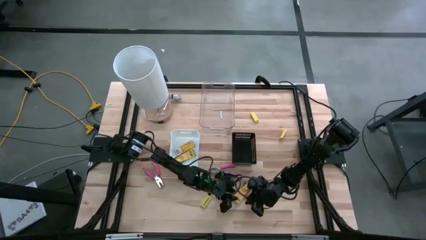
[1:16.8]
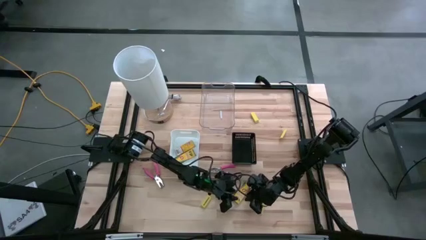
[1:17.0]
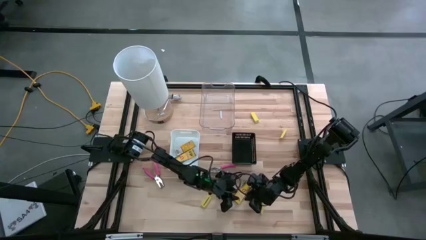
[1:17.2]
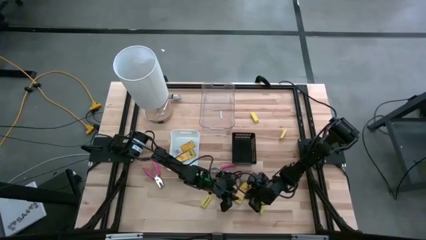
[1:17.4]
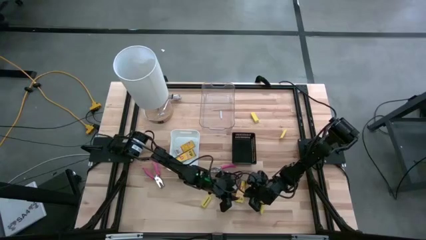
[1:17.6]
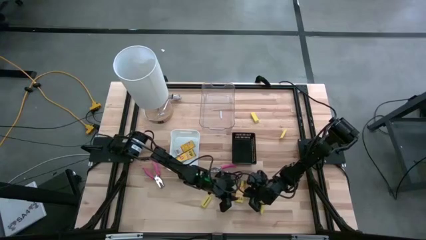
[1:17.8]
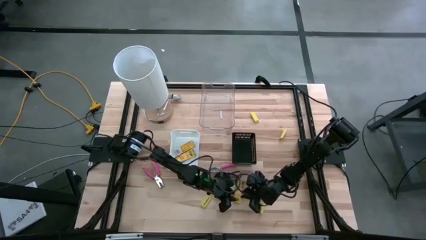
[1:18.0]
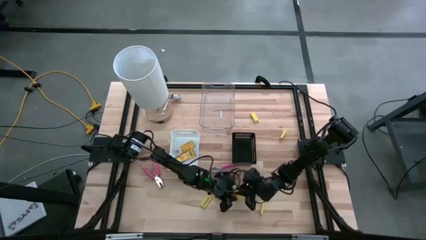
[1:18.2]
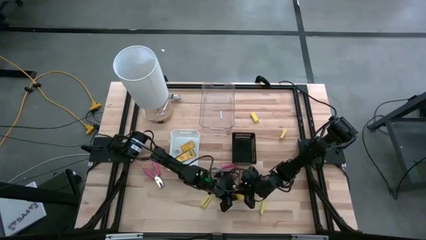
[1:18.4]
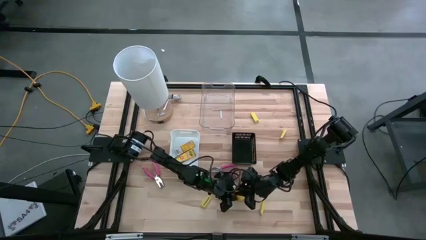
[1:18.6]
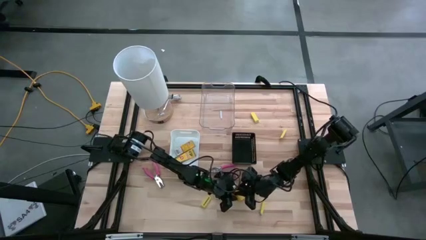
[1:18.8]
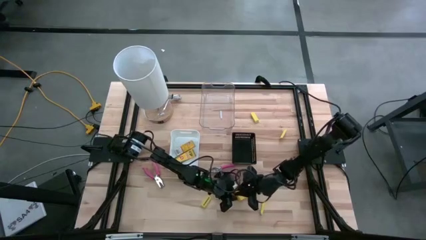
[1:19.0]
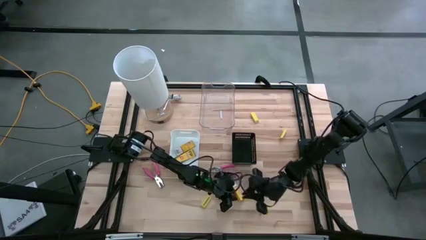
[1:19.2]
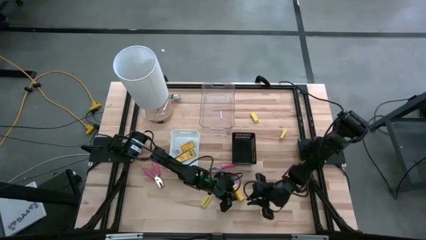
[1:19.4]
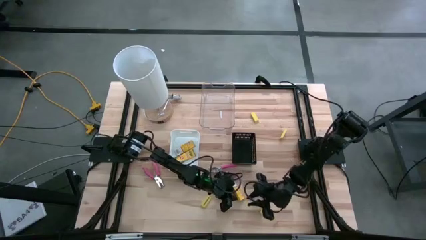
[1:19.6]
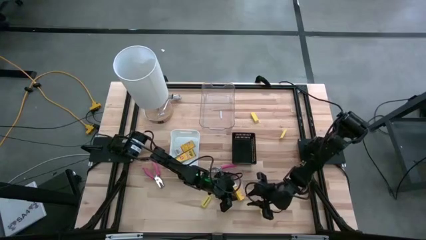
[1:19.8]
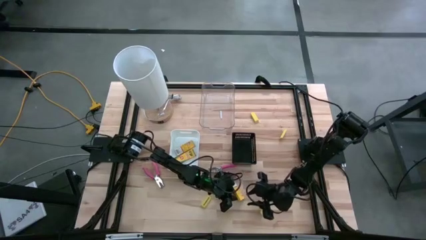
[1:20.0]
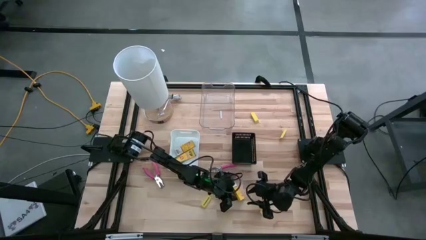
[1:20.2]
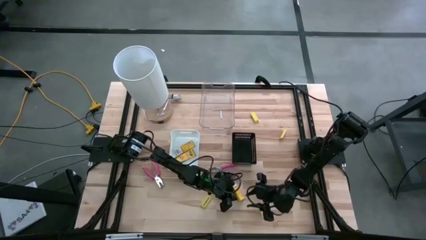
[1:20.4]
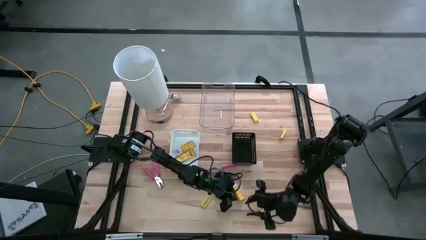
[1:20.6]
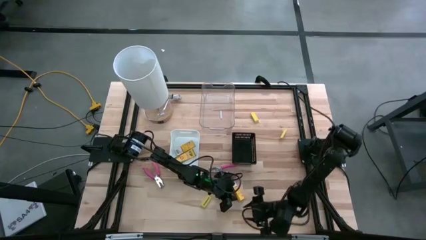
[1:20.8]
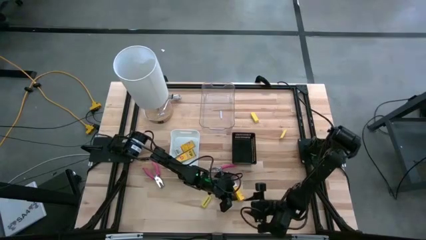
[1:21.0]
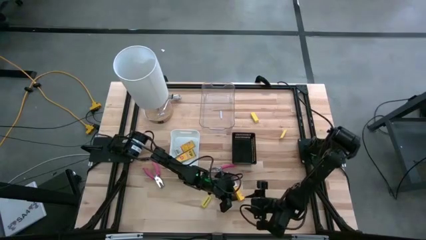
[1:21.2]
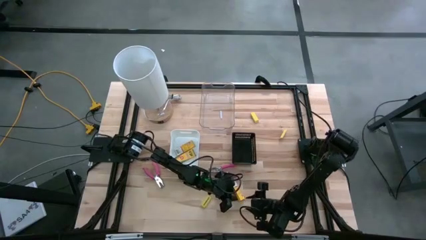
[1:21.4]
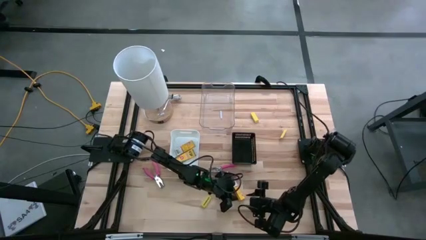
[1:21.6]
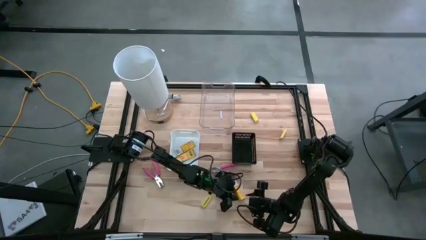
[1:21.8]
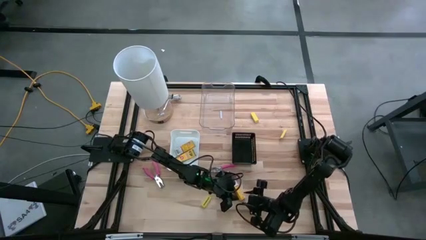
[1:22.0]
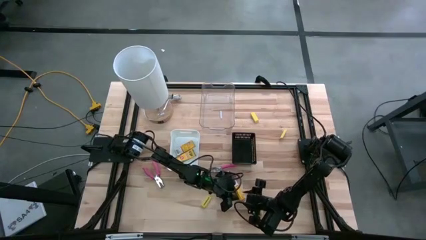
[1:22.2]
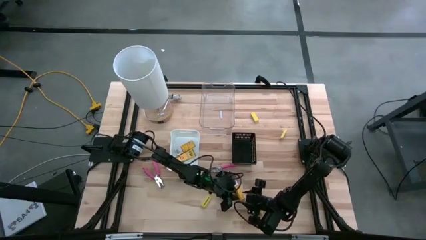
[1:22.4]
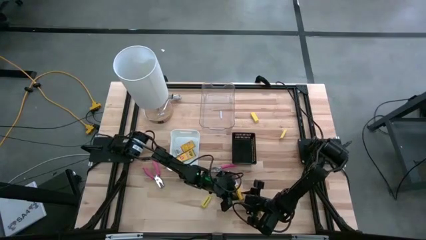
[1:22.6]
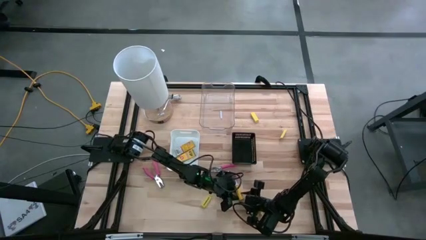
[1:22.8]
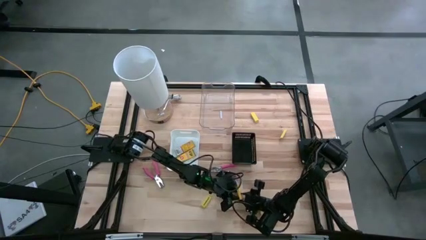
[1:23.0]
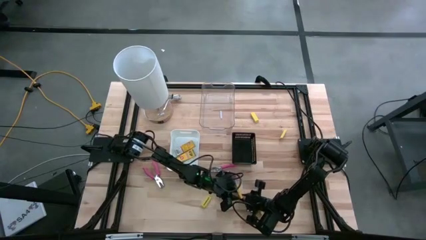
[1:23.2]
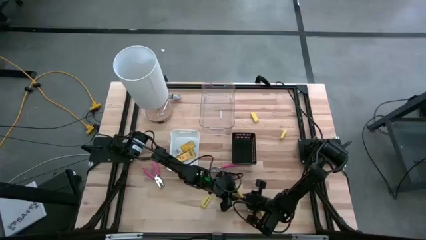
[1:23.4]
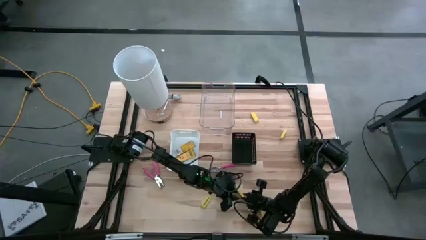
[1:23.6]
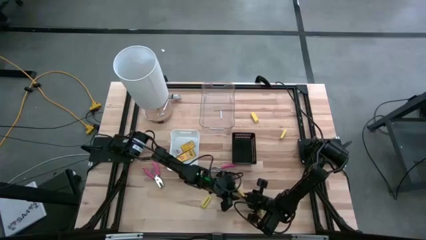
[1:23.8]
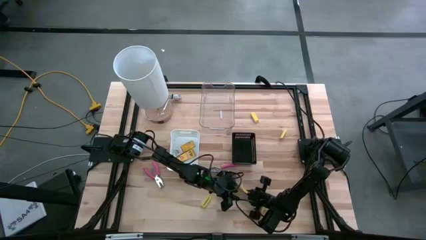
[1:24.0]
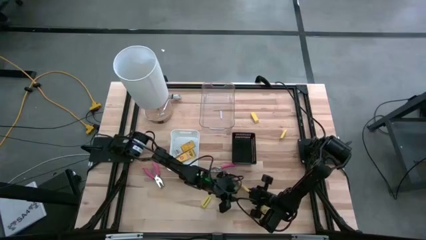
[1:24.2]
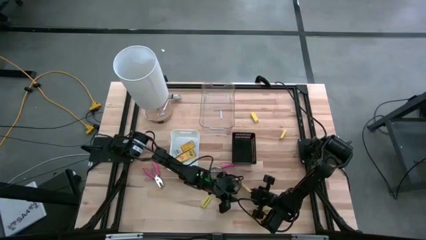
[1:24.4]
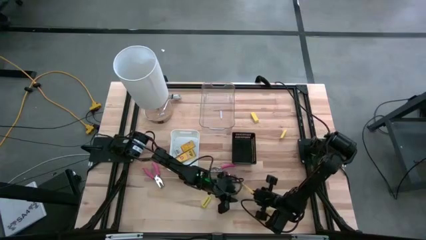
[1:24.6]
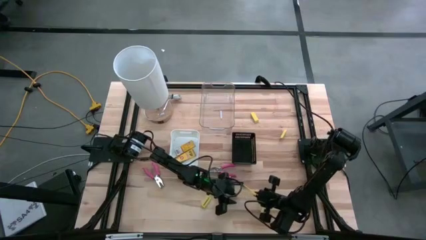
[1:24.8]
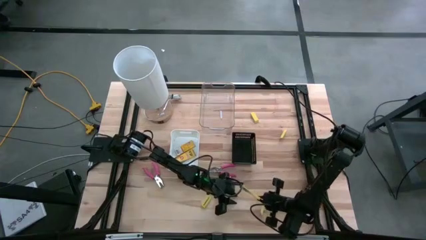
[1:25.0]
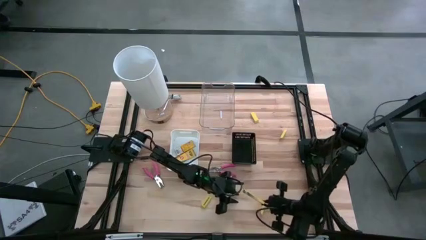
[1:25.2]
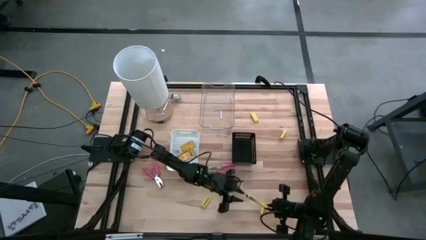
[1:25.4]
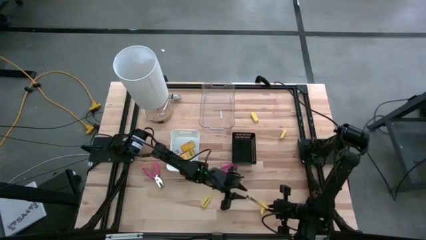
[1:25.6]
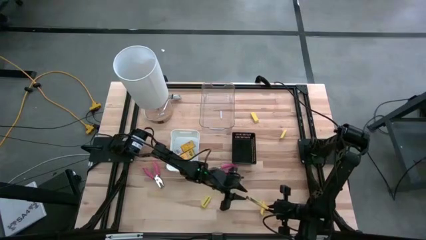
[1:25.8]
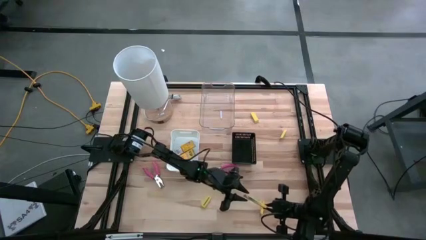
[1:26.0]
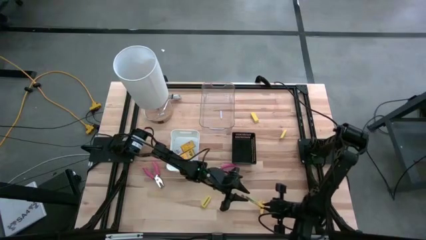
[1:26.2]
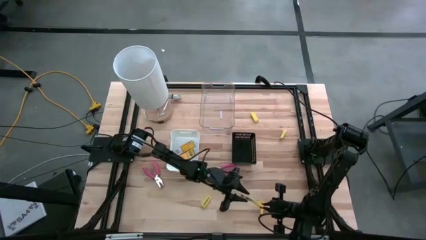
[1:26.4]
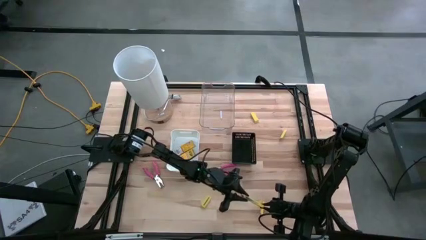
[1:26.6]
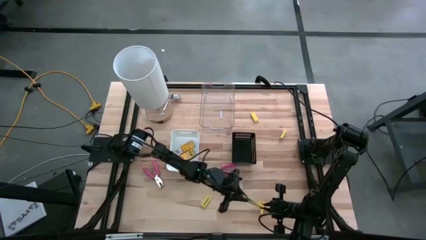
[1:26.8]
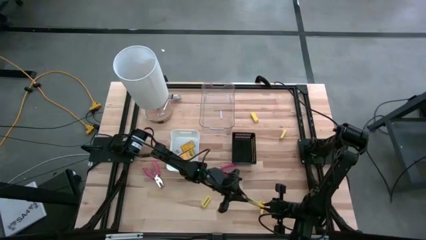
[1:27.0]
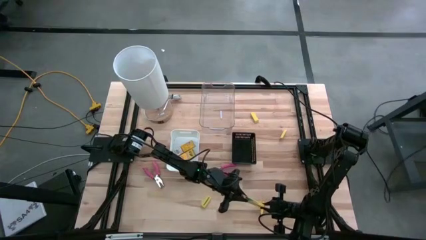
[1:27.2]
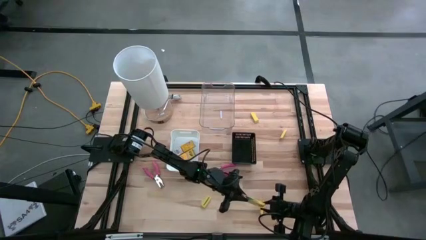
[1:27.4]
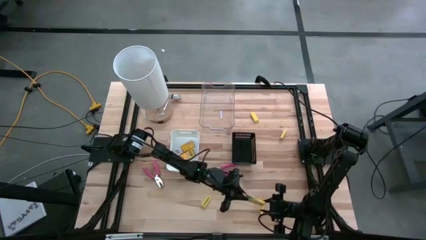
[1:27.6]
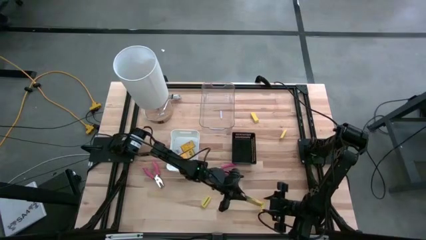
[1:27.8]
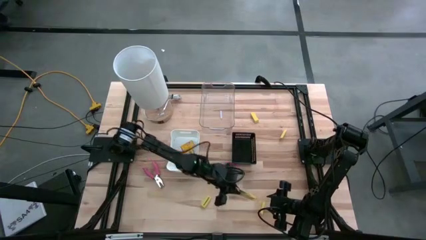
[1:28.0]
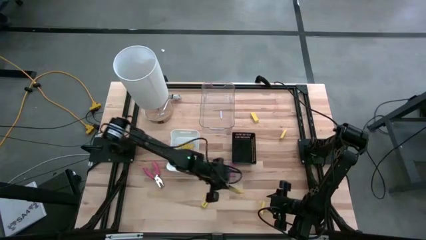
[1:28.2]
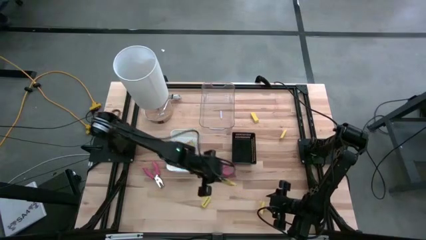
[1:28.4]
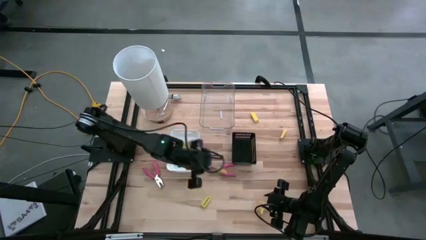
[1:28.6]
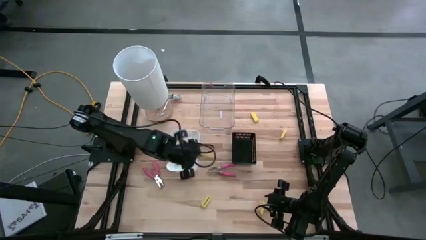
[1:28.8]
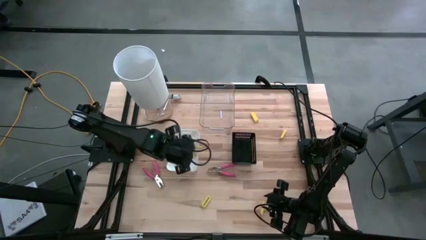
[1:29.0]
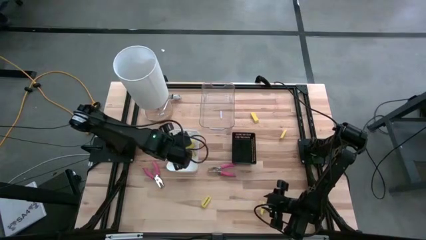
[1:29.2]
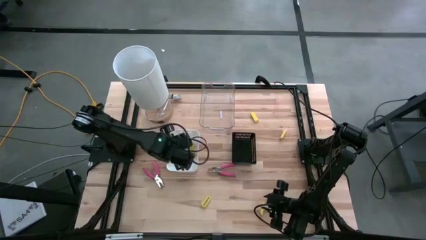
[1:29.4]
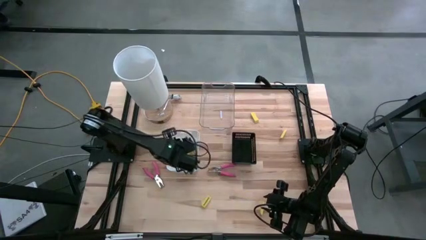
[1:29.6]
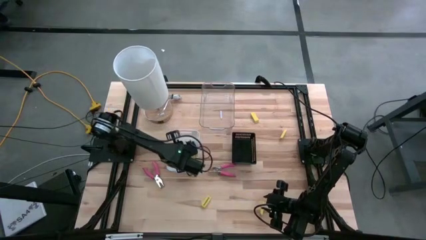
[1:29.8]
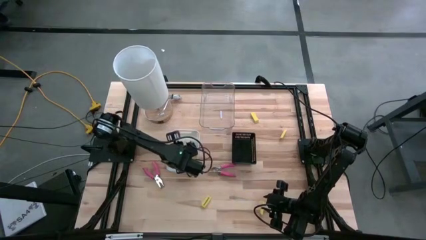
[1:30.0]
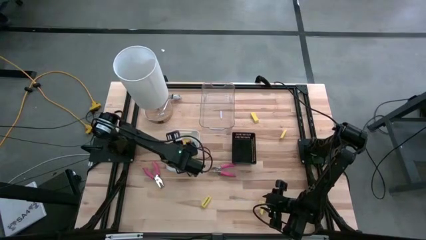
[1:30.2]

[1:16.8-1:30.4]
Task: Pick & Place School Supplies
Put the box of crayon into the white bin
